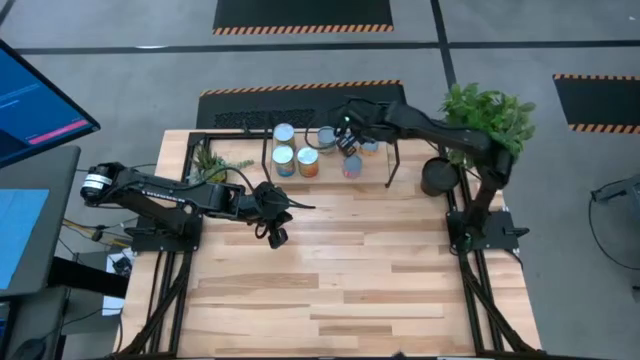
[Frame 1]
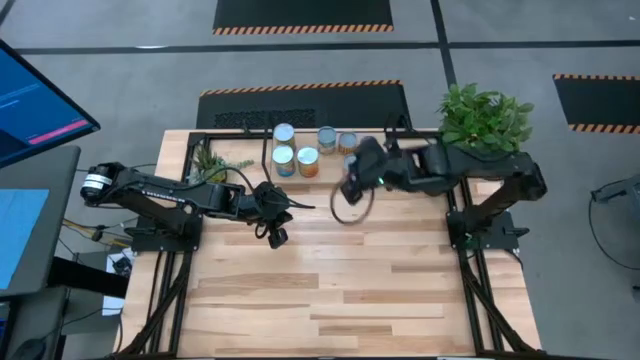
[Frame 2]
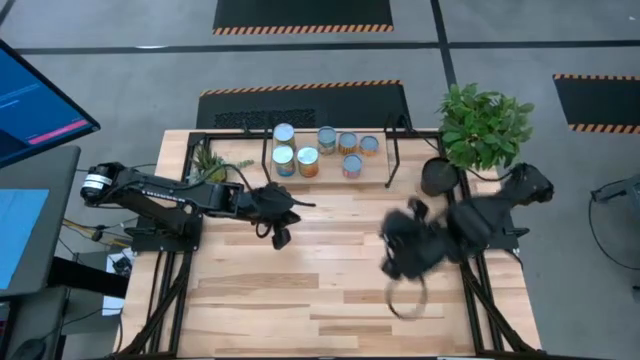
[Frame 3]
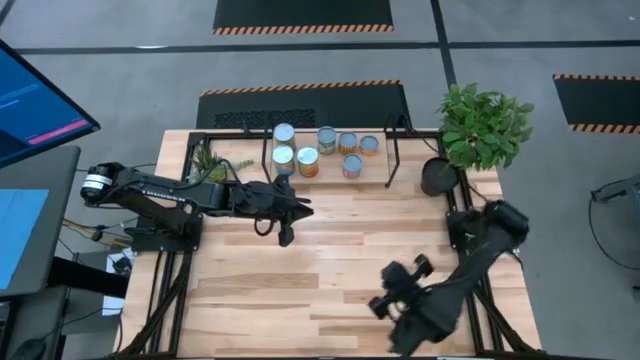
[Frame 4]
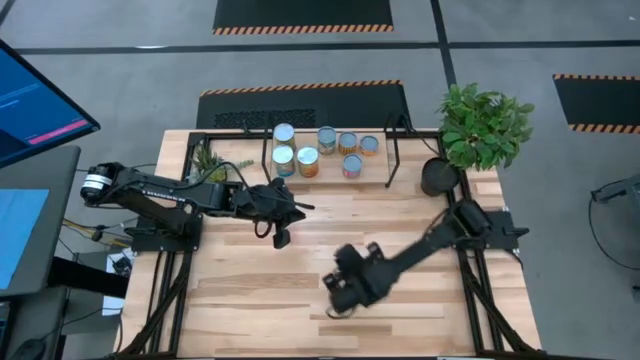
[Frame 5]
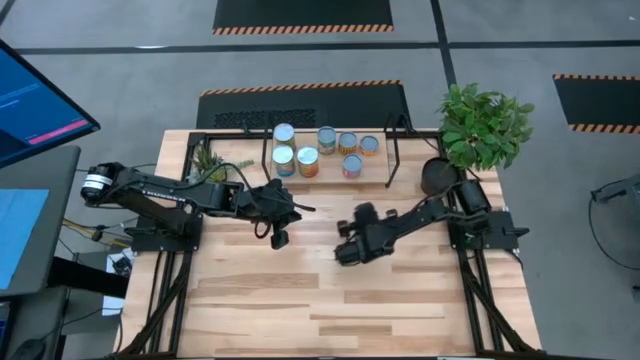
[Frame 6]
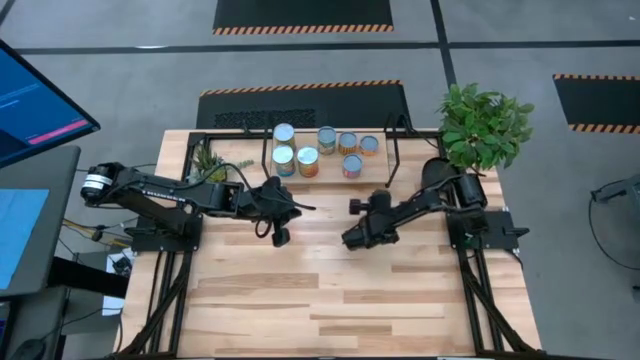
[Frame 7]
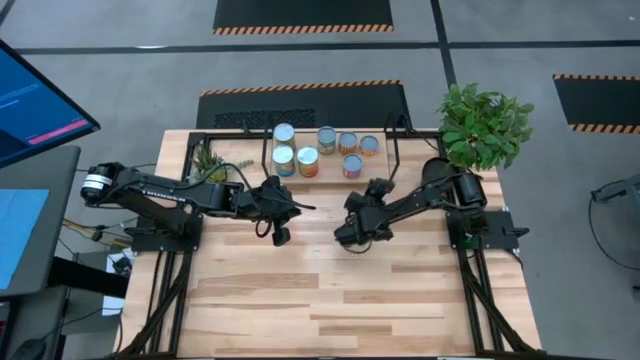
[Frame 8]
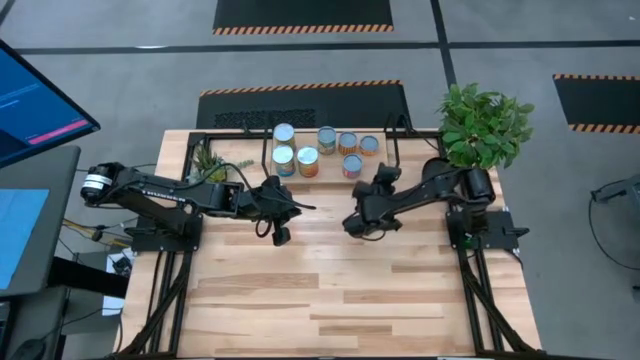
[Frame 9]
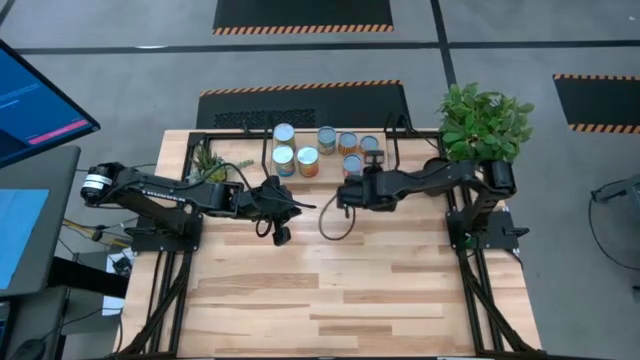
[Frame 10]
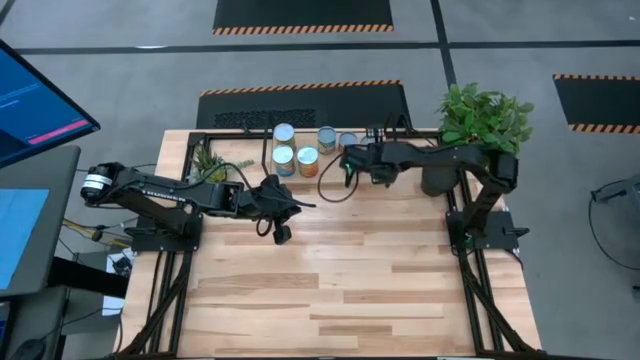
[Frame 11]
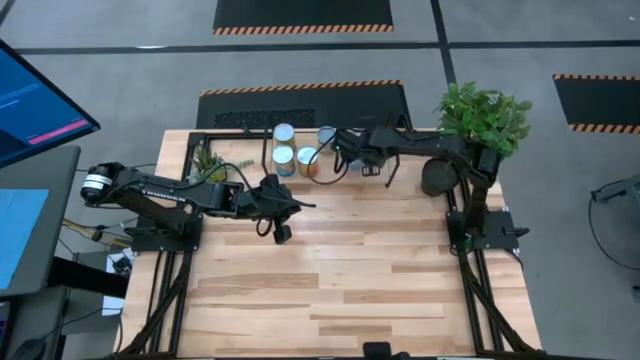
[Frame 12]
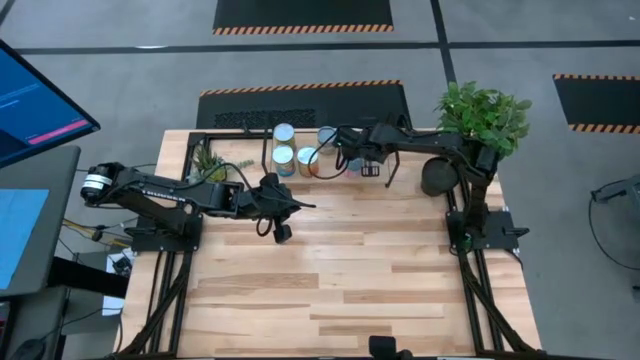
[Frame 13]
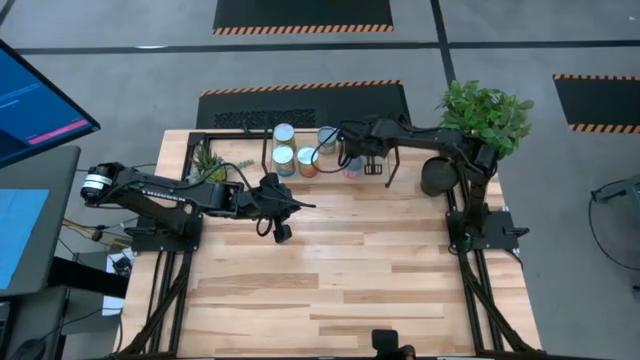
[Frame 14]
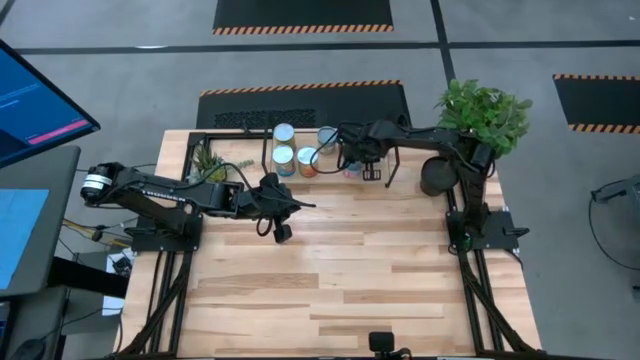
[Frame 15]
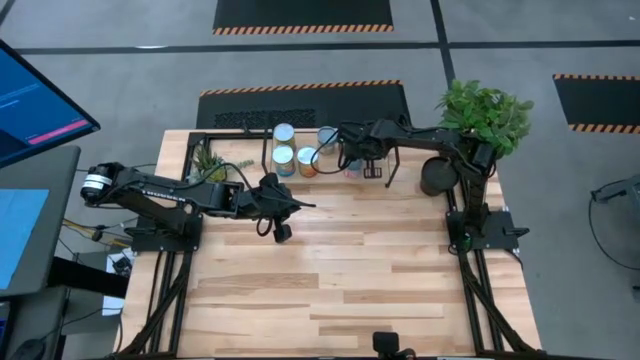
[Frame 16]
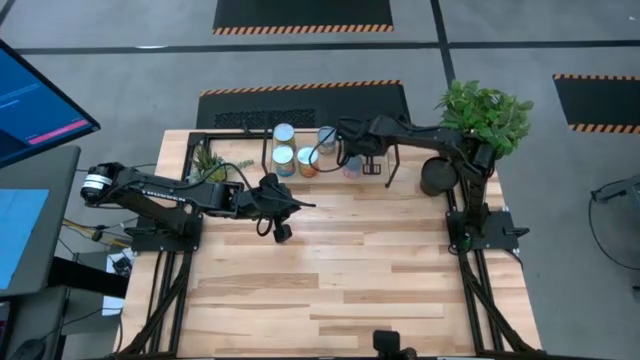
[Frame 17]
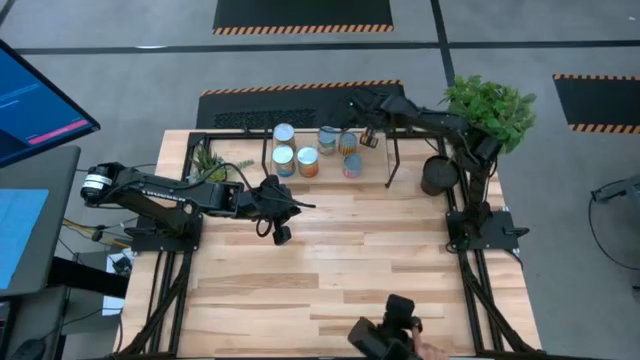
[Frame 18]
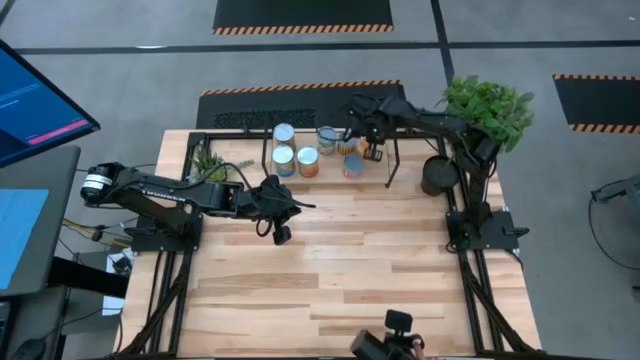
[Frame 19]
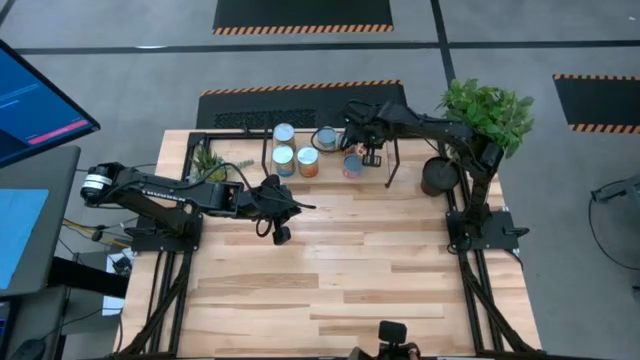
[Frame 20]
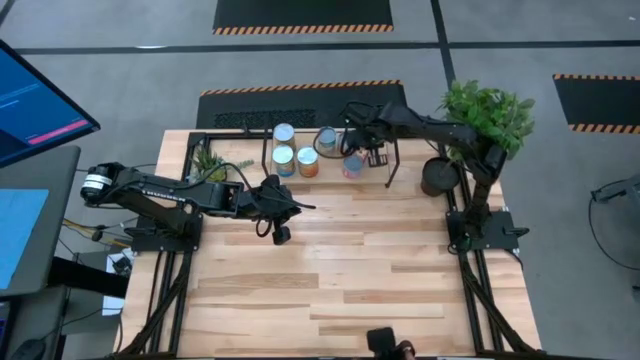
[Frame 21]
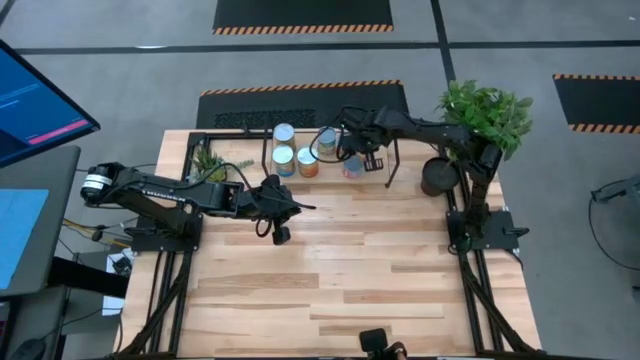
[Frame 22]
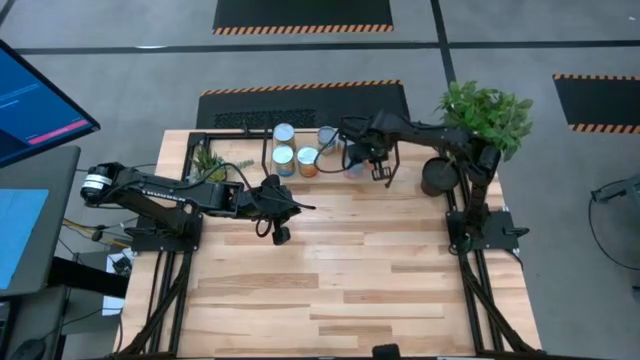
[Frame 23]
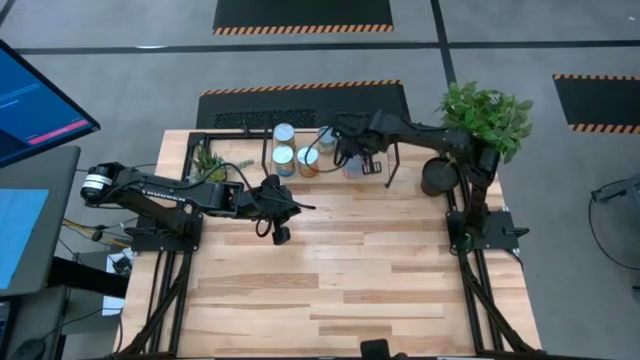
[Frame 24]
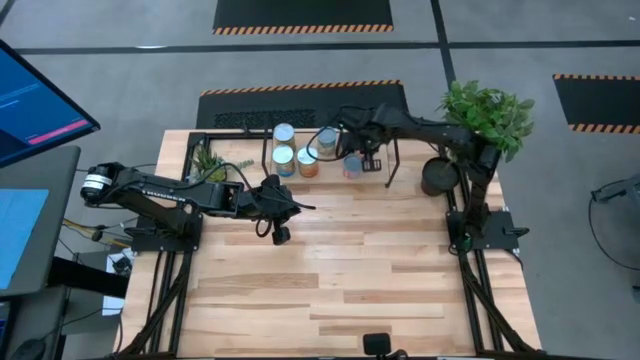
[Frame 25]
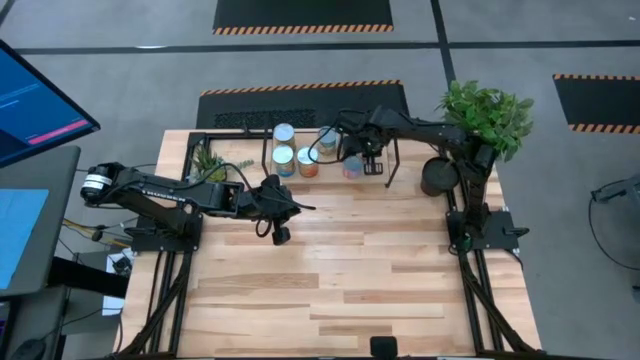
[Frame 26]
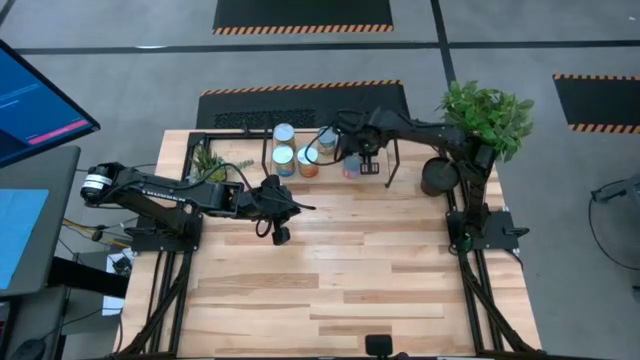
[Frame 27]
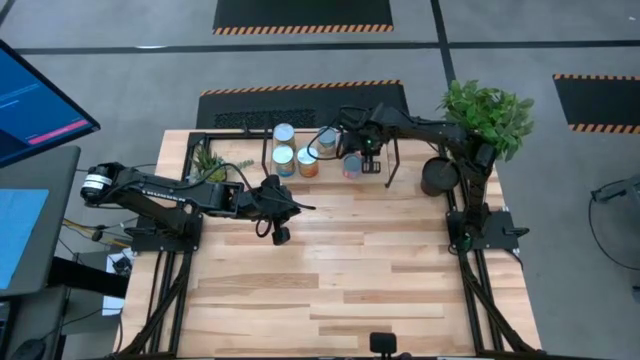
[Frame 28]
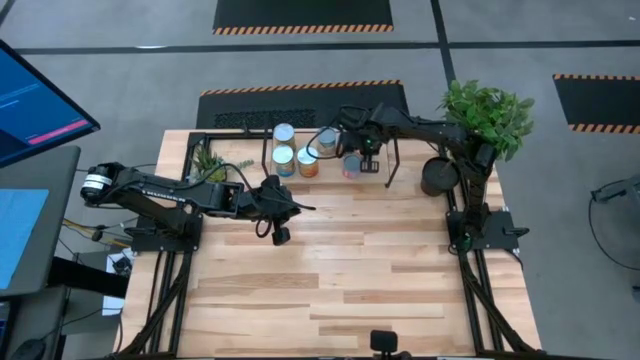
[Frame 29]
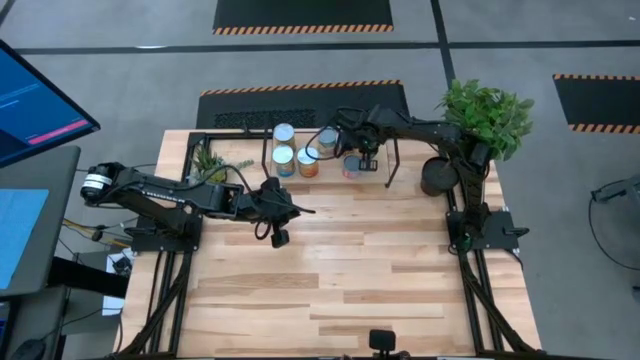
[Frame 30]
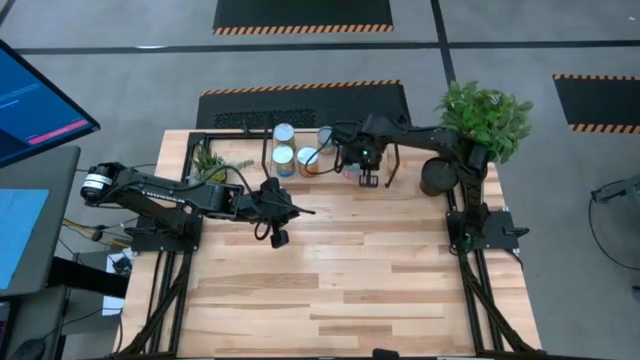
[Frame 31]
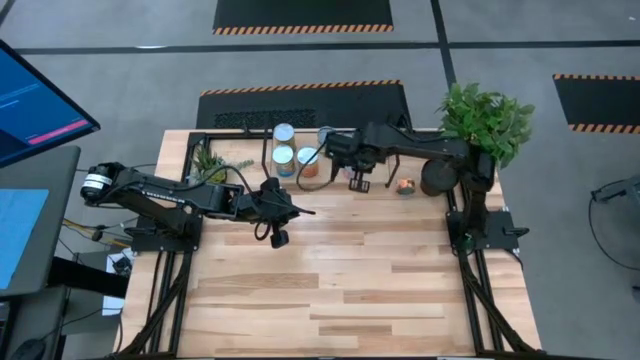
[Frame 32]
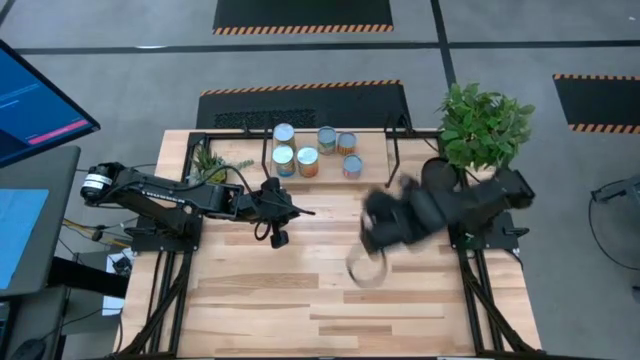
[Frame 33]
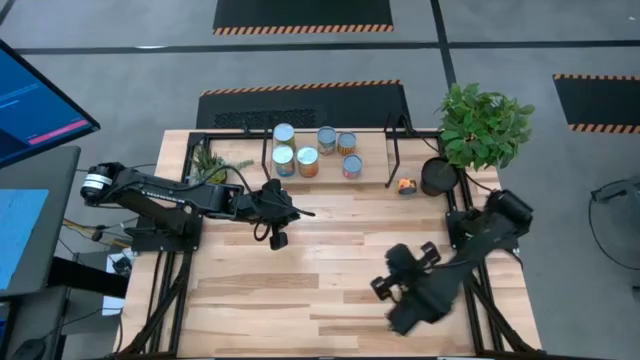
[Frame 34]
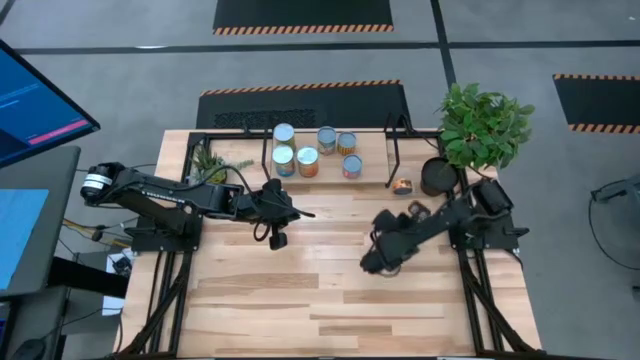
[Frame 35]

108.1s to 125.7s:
Task: Pick and place cans onto a shelf
Adjust the canned pineapple on the shelf

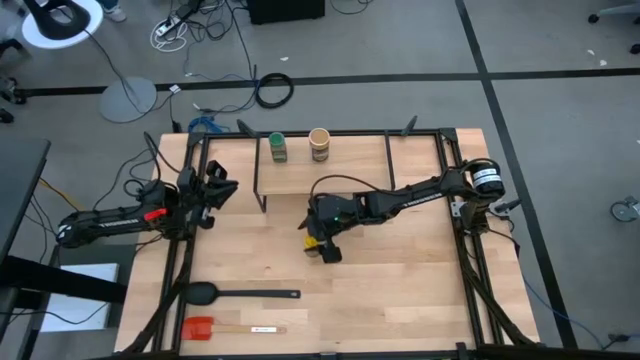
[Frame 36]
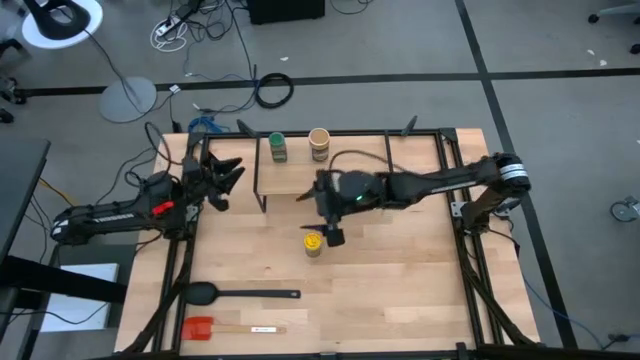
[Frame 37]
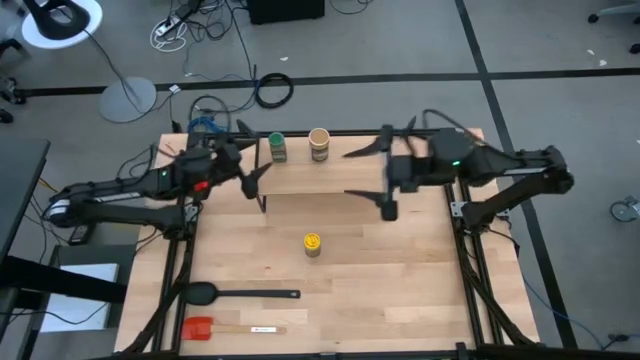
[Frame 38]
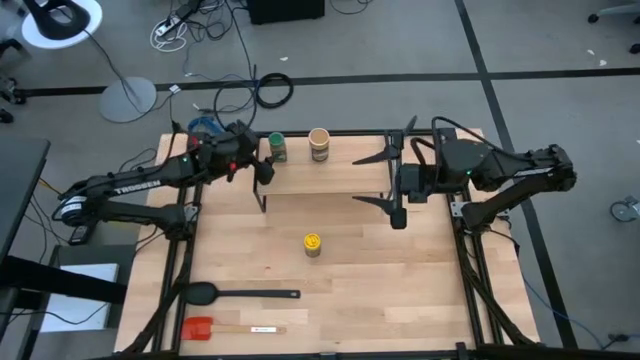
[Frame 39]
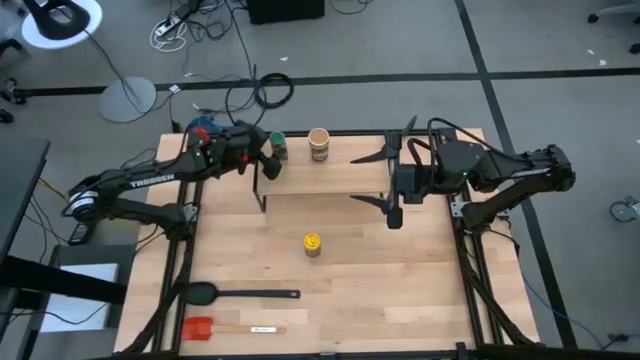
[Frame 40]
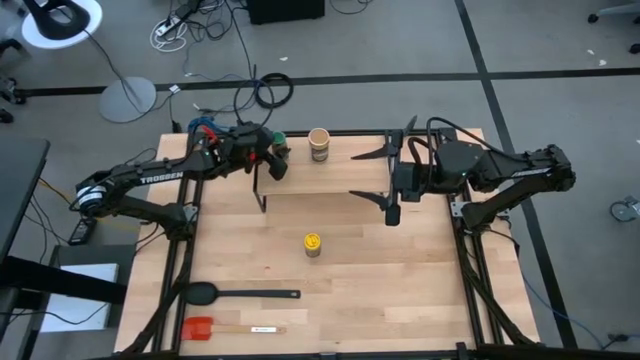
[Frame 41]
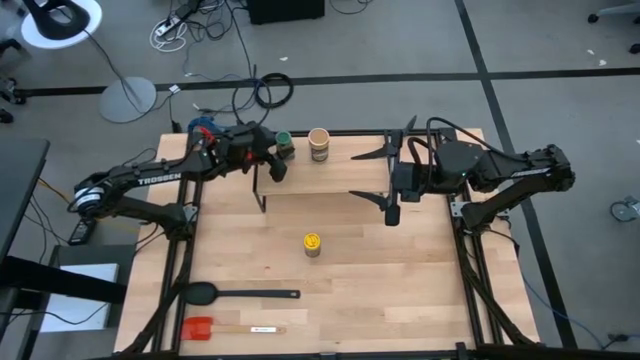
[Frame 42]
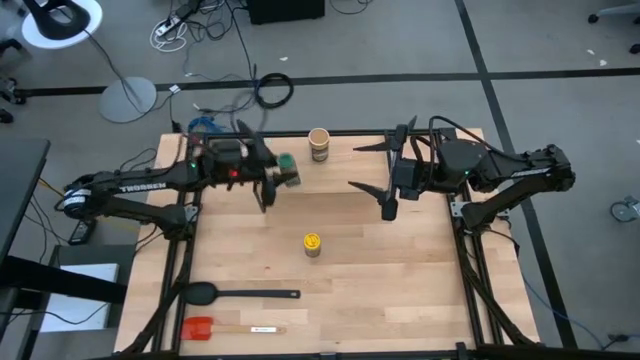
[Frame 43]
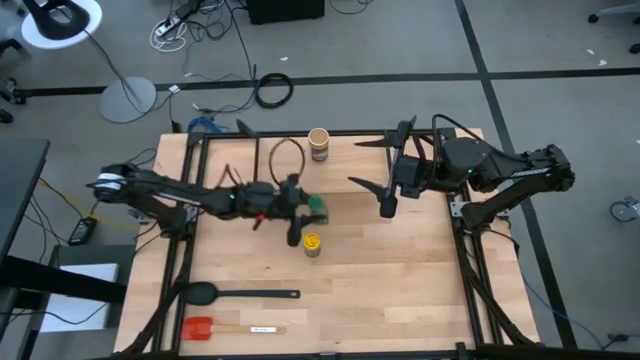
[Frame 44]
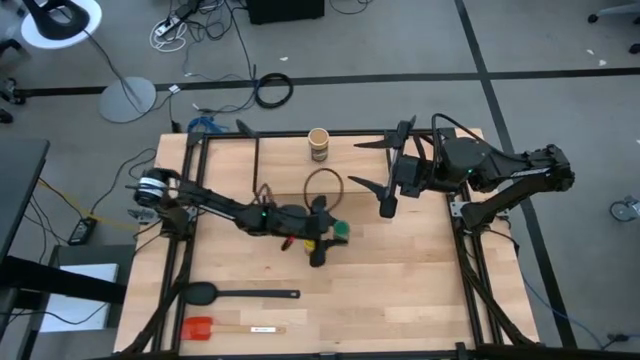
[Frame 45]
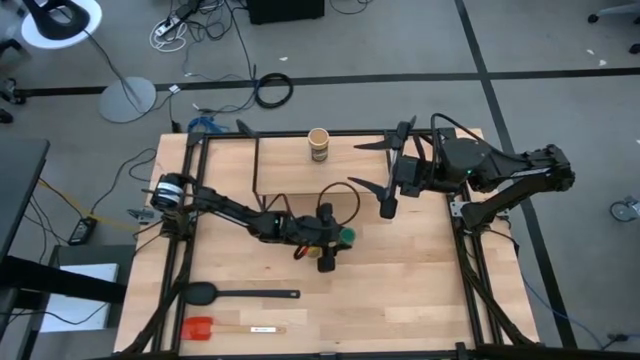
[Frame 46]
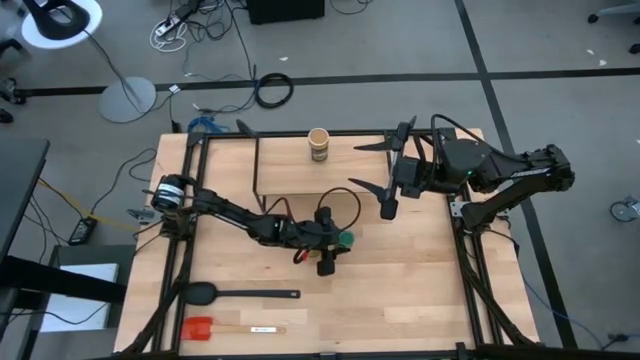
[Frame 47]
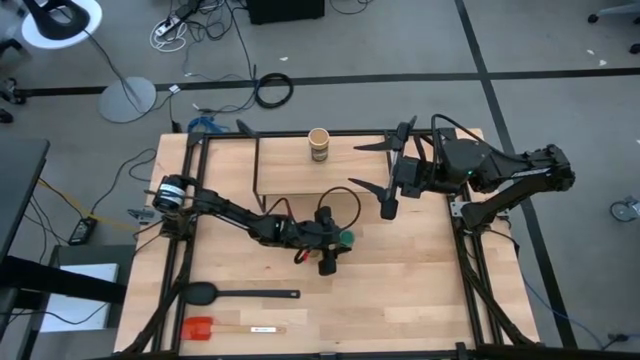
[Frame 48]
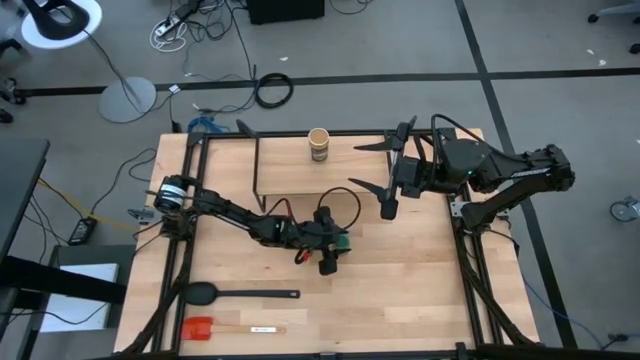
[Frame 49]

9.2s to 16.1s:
Task: Shelf spices
Remove the green seasoning bottle from the shelf
